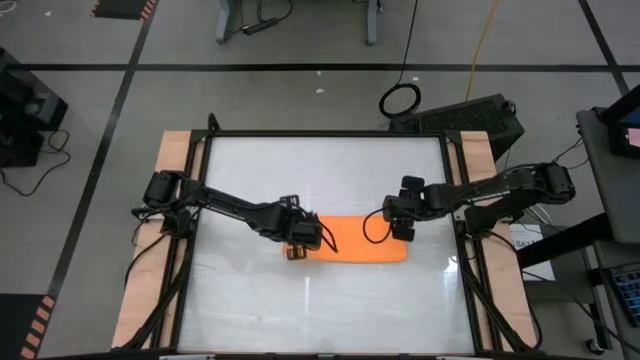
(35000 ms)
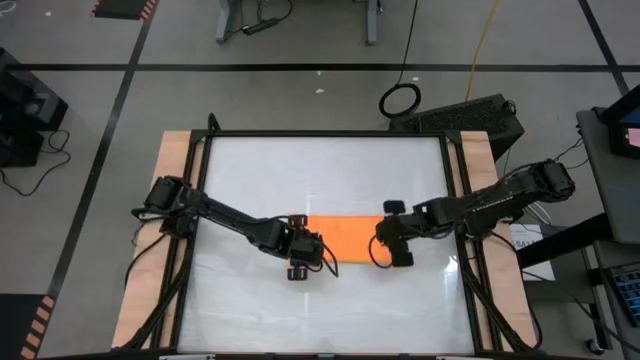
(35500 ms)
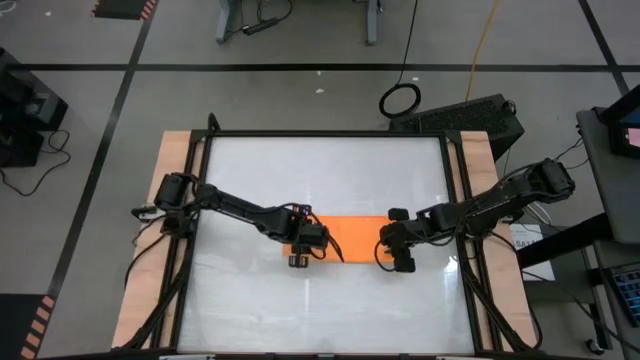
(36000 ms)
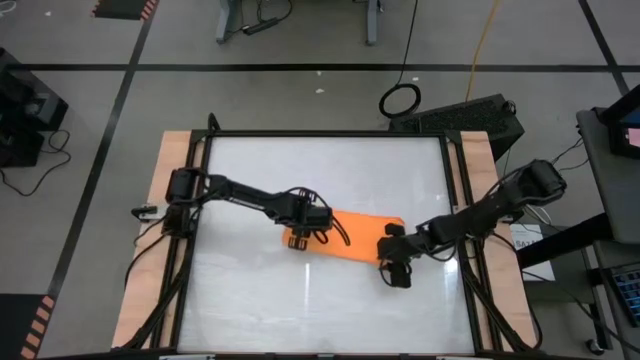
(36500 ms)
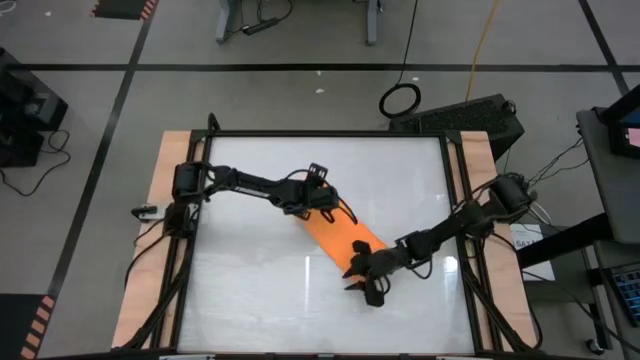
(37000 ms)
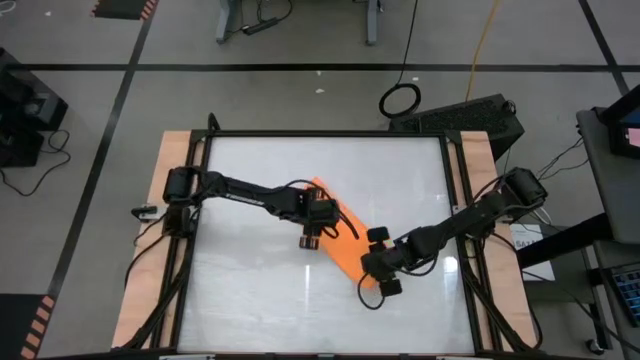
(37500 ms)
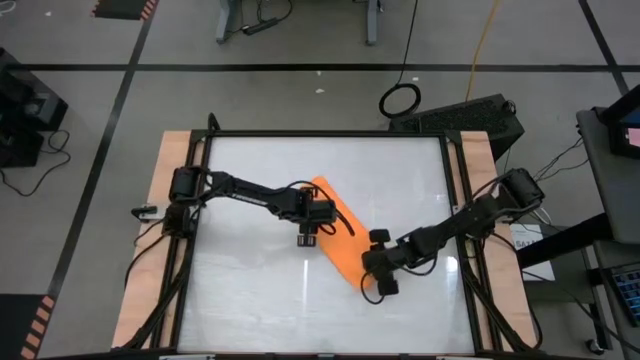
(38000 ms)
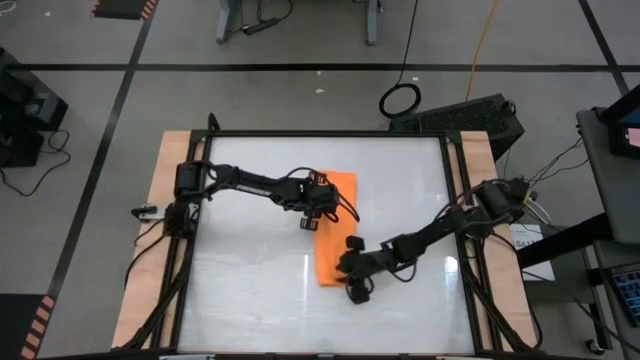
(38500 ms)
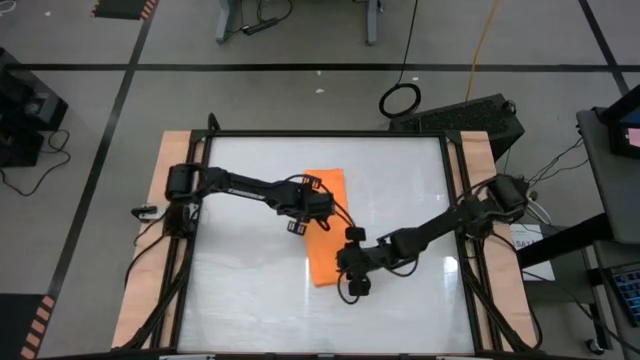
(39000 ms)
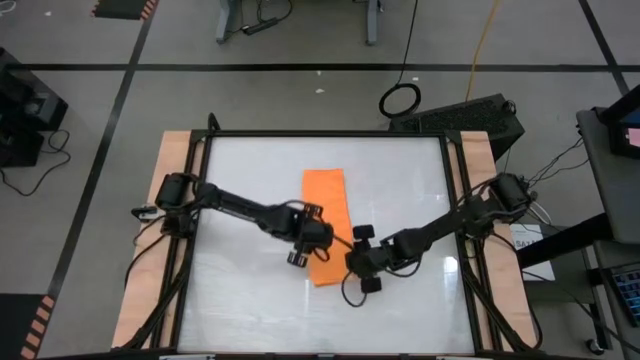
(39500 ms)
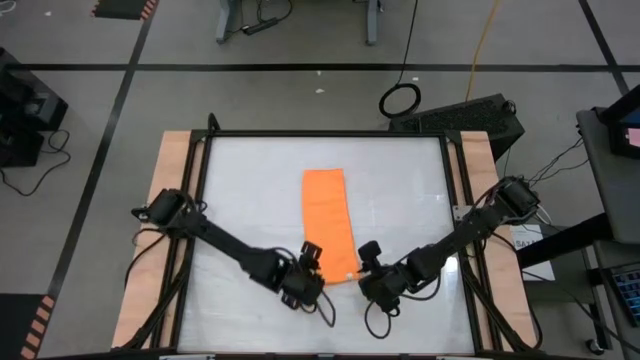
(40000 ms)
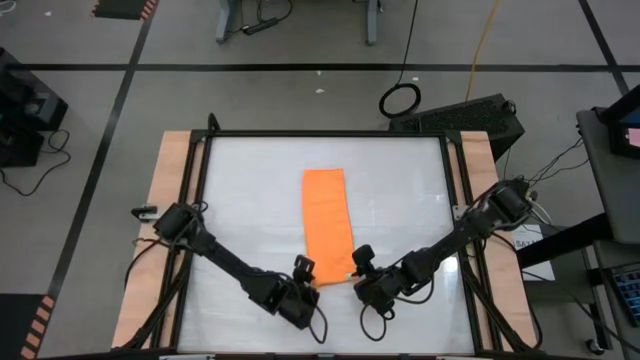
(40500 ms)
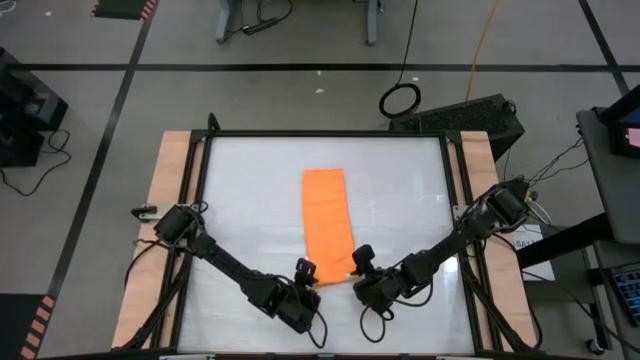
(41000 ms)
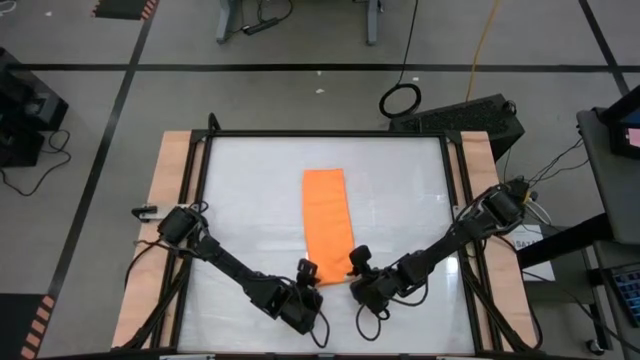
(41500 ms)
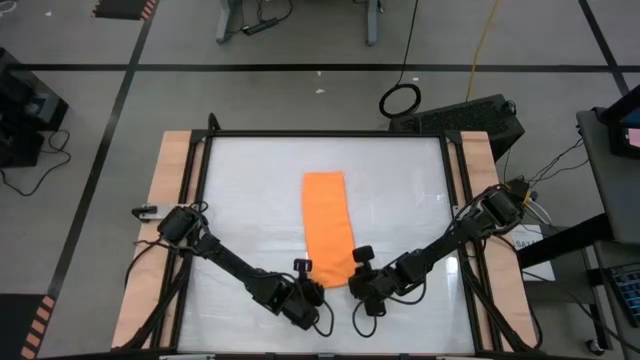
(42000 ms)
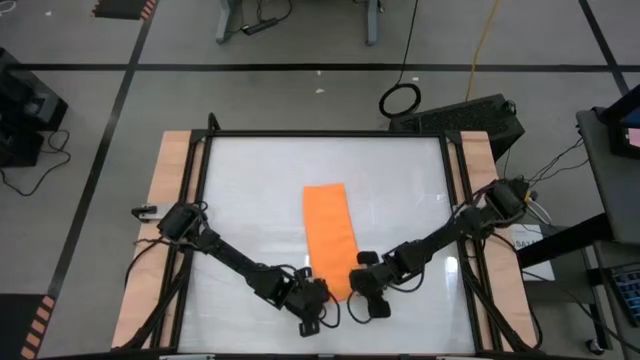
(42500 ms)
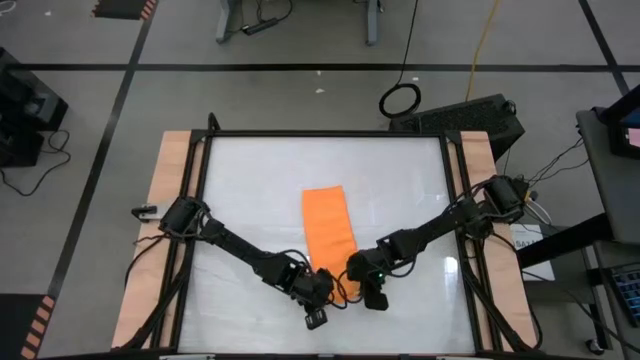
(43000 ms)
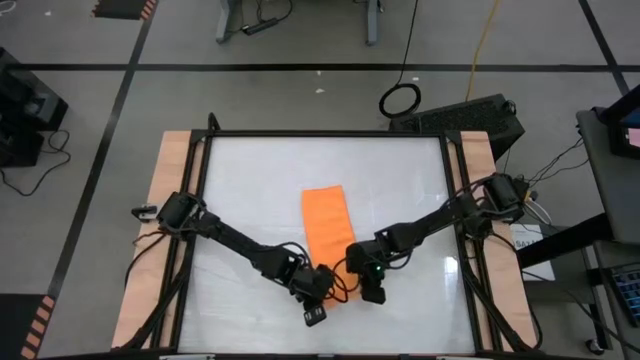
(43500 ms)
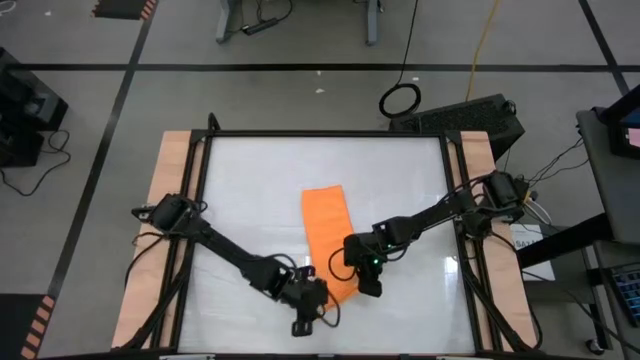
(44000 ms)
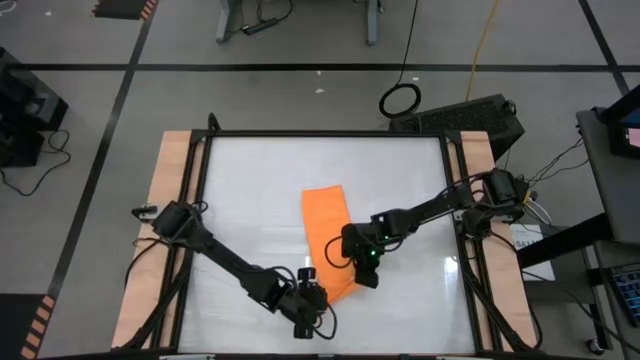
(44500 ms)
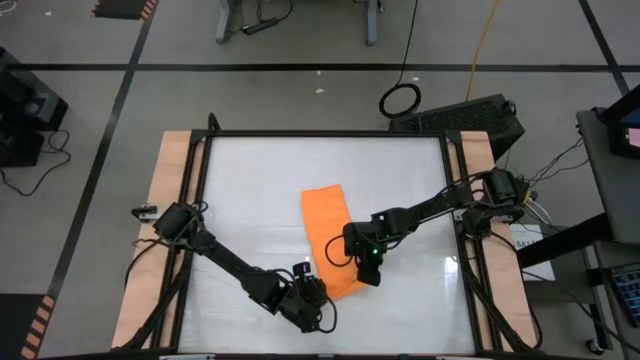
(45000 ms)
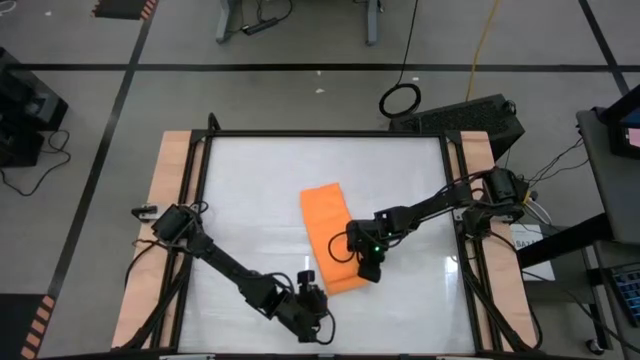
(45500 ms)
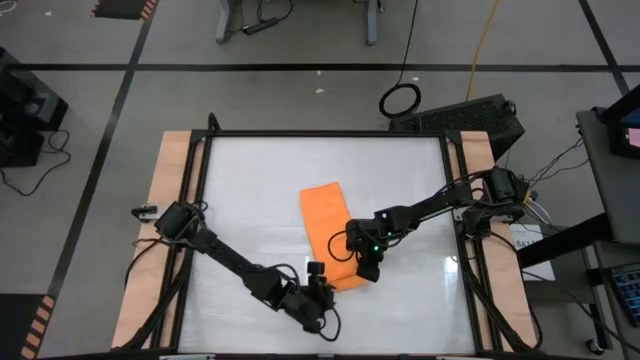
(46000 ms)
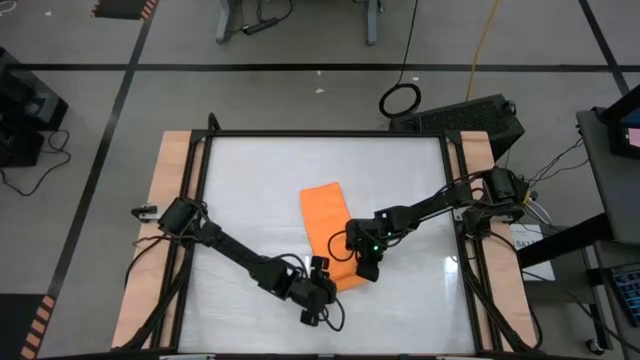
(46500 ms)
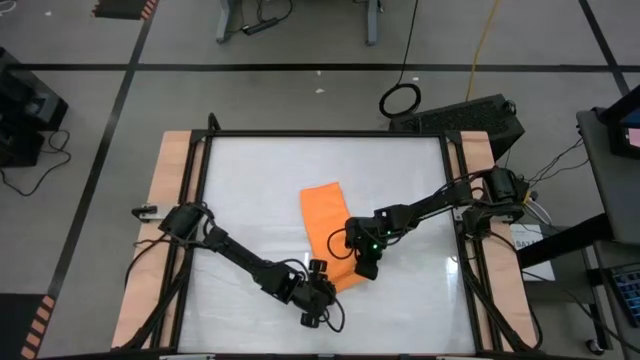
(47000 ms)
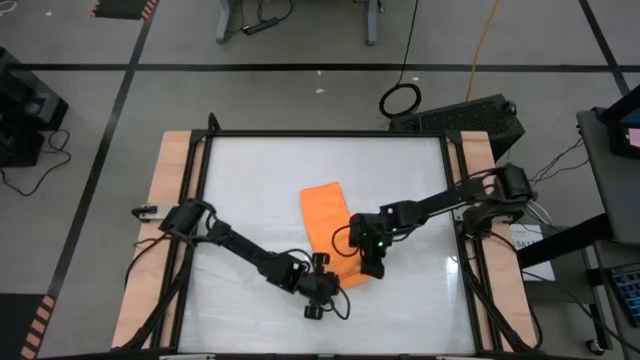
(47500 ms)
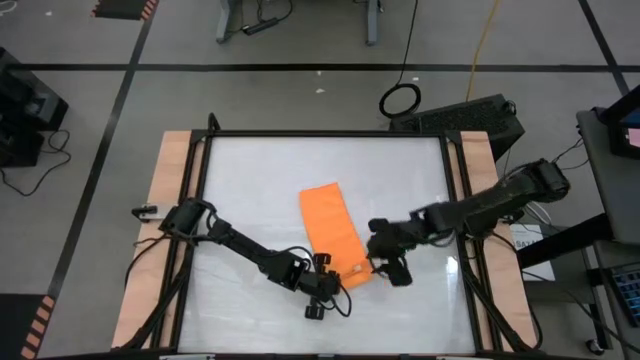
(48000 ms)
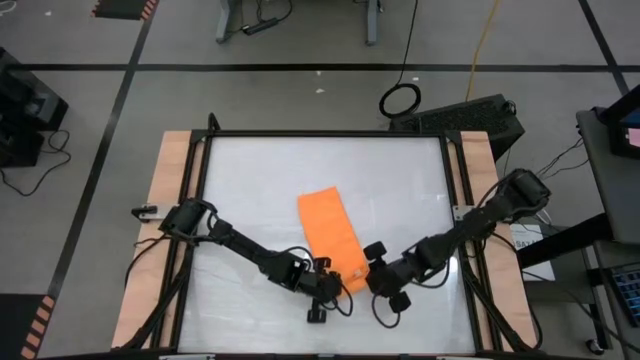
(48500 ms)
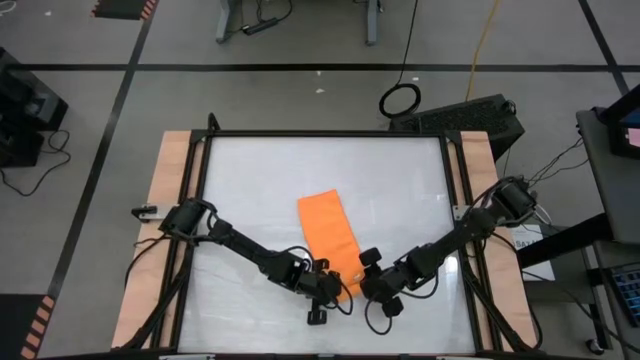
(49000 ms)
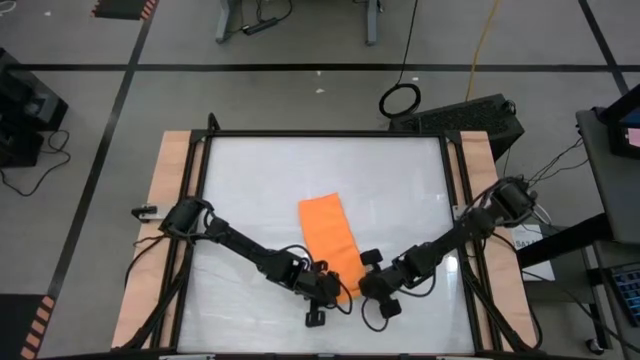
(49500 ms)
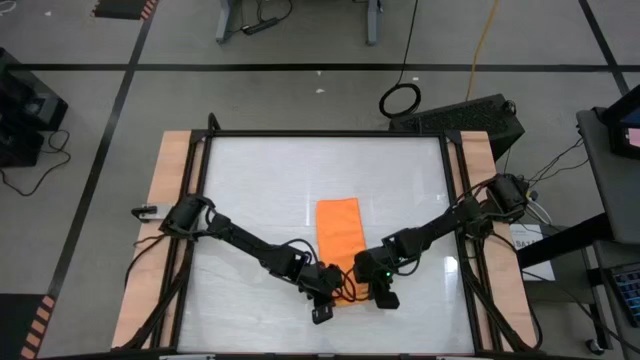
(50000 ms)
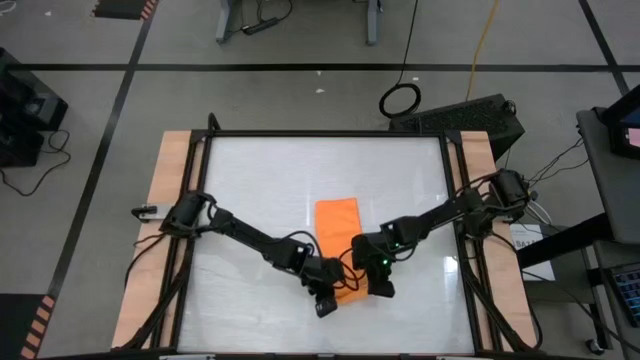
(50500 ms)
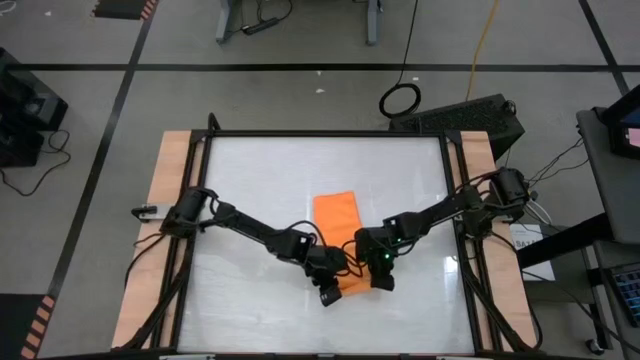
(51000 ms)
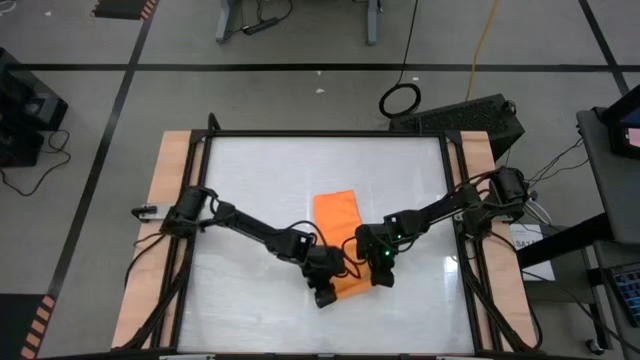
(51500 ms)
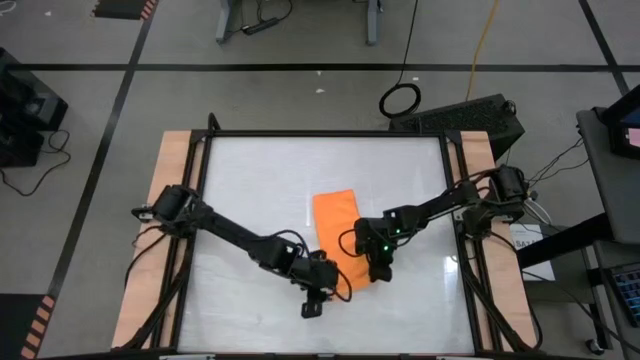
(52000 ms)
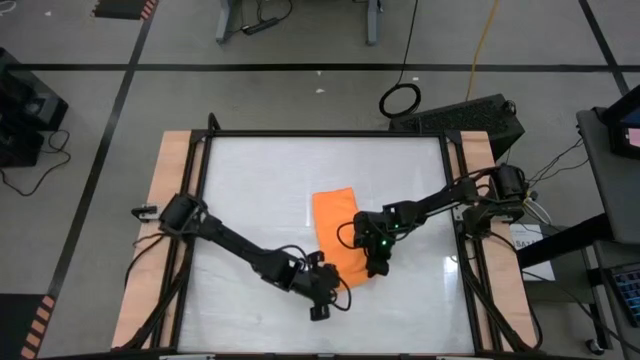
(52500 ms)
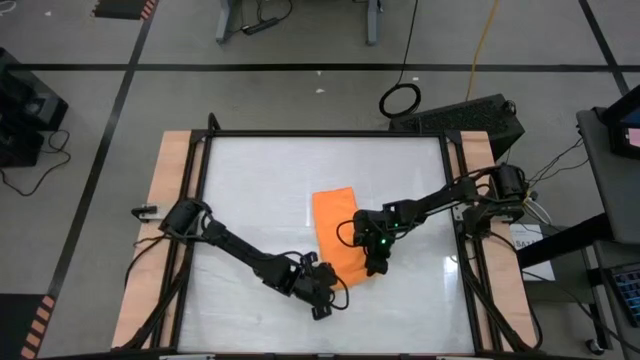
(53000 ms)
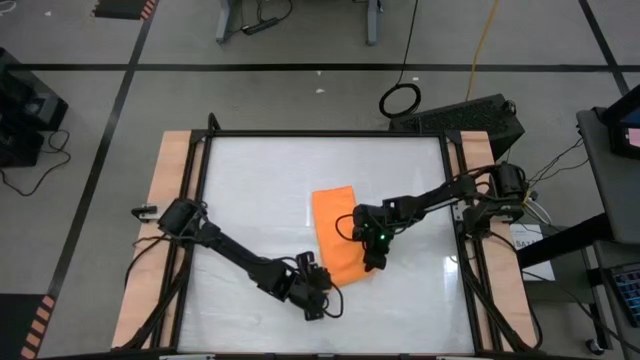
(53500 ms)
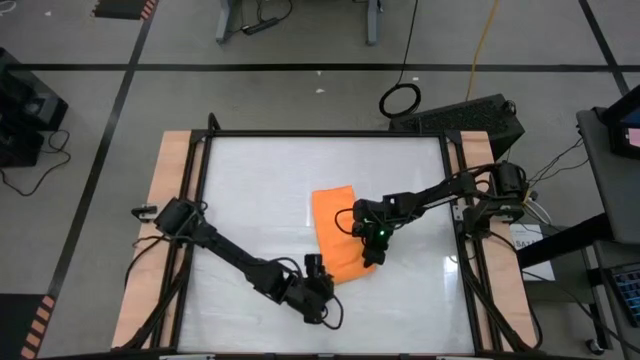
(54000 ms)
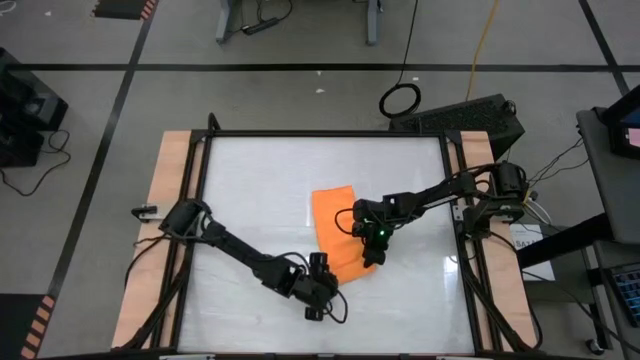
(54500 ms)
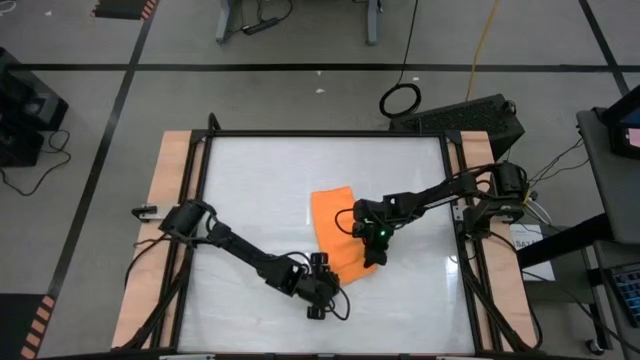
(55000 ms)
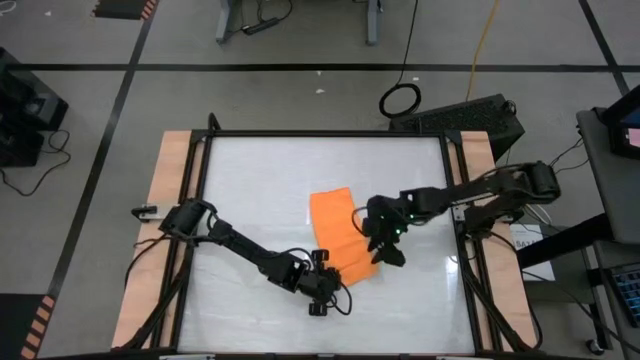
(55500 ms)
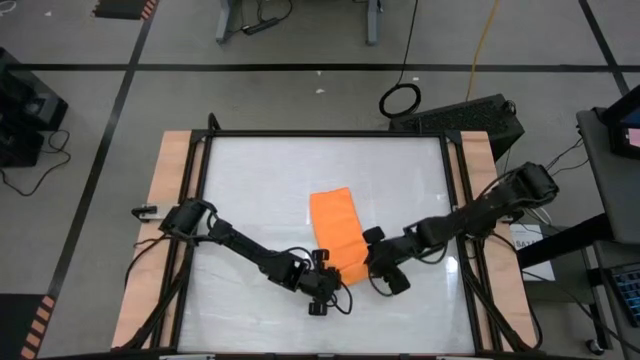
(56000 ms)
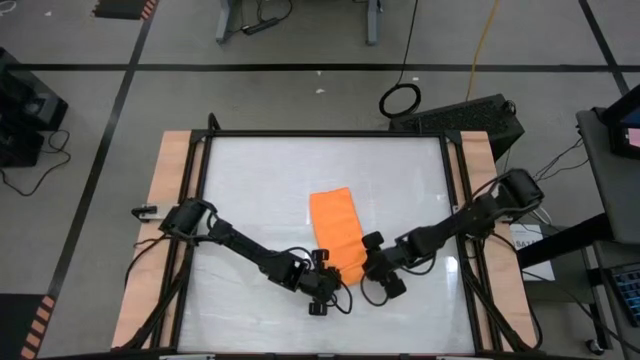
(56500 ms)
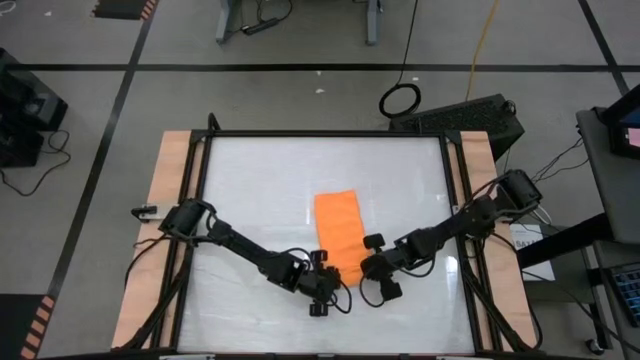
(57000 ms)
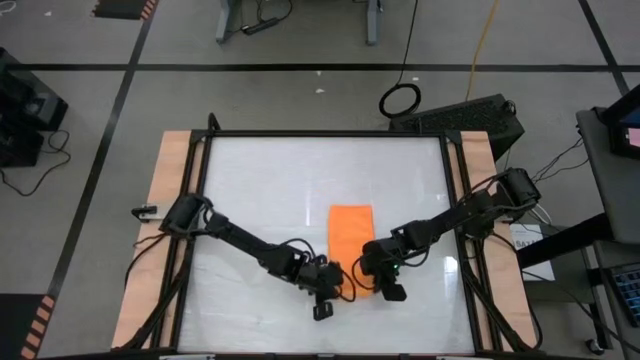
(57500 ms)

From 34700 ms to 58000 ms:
Task: Roll towel
Roll the orange microfiber cloth
